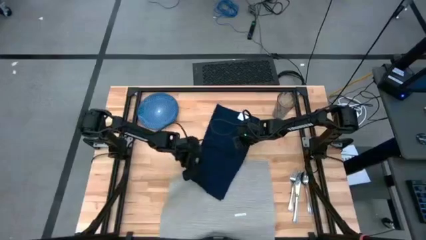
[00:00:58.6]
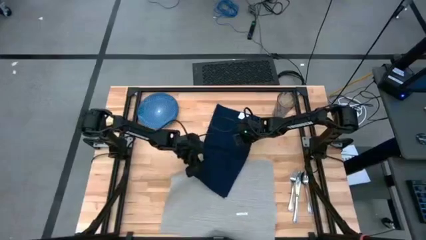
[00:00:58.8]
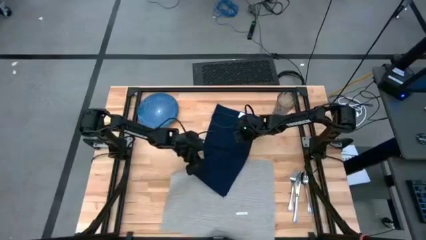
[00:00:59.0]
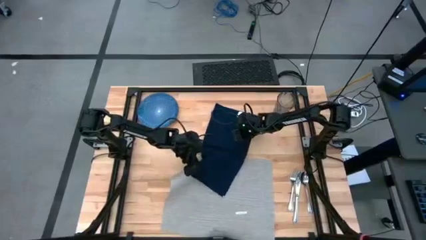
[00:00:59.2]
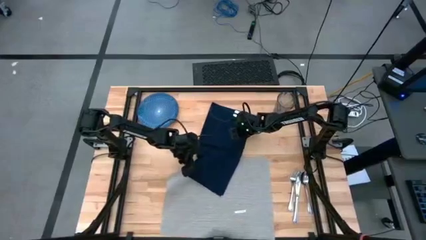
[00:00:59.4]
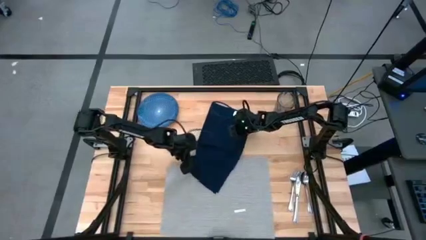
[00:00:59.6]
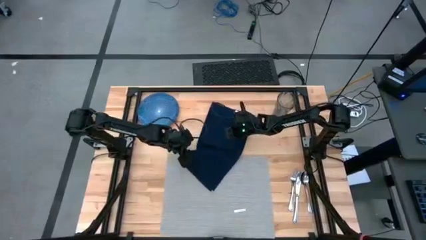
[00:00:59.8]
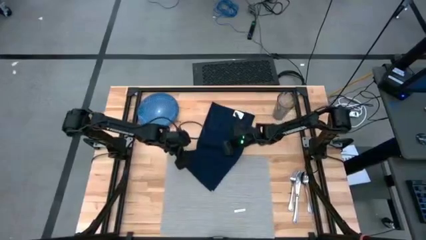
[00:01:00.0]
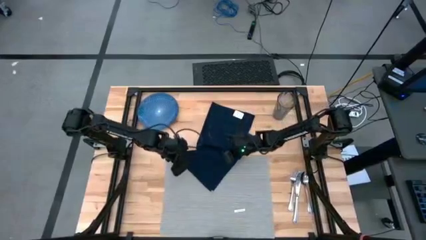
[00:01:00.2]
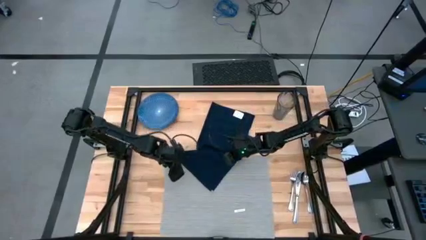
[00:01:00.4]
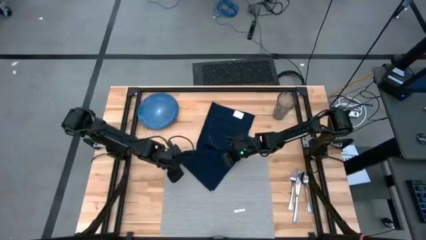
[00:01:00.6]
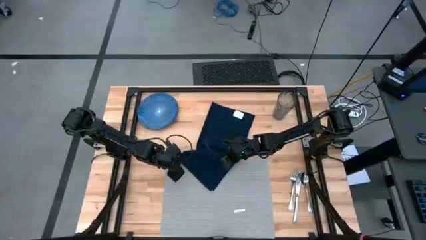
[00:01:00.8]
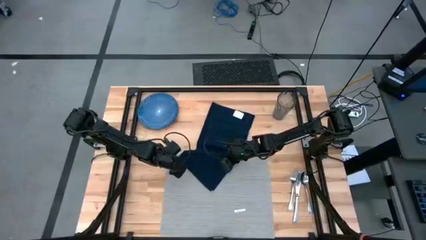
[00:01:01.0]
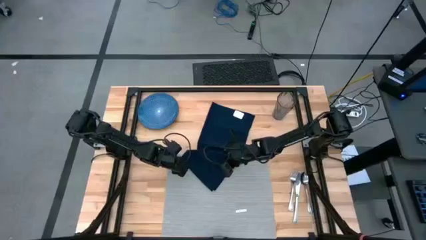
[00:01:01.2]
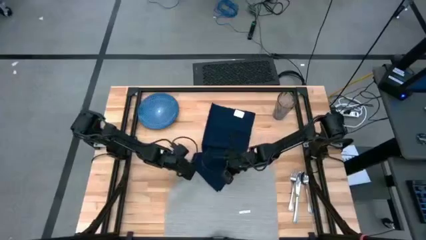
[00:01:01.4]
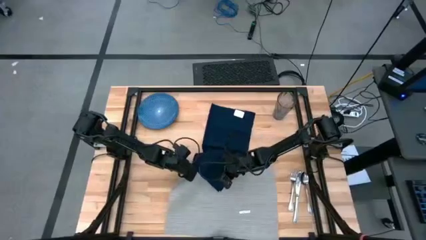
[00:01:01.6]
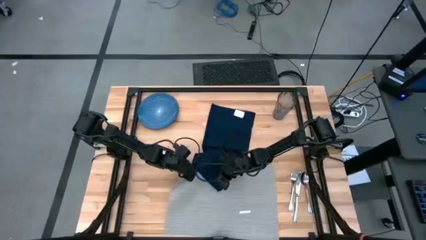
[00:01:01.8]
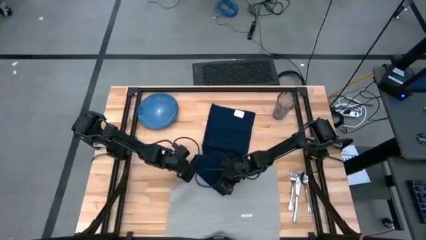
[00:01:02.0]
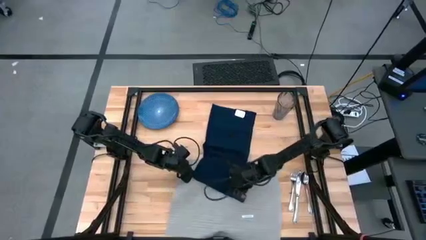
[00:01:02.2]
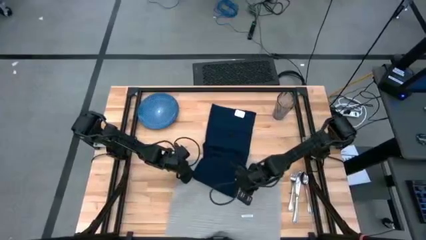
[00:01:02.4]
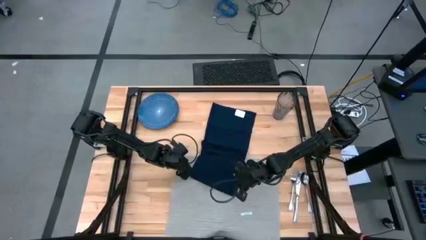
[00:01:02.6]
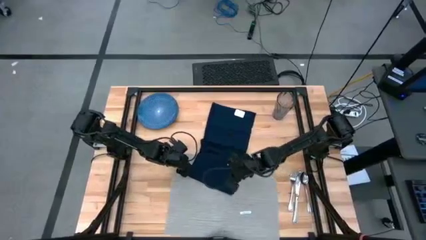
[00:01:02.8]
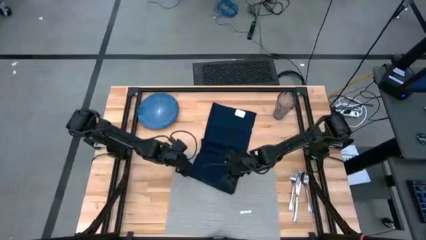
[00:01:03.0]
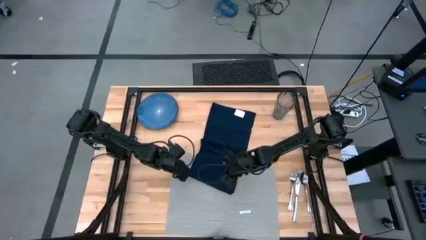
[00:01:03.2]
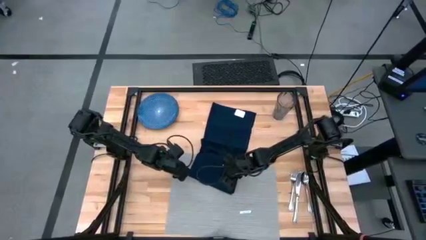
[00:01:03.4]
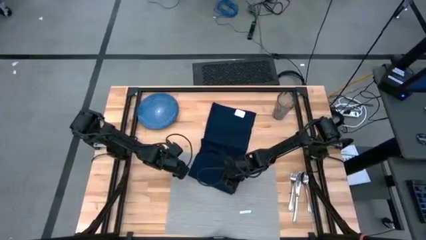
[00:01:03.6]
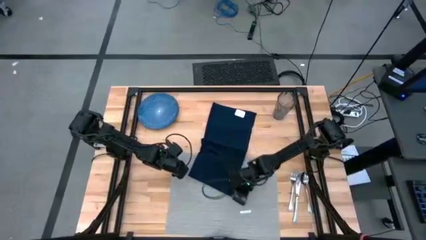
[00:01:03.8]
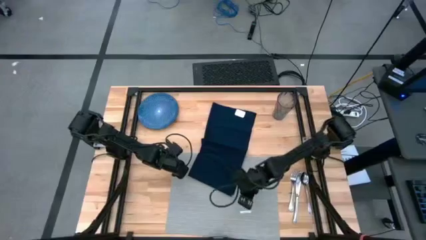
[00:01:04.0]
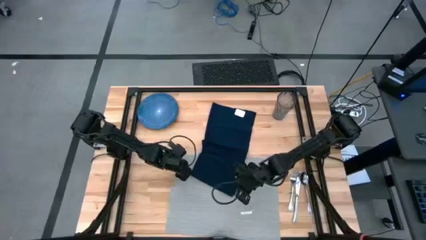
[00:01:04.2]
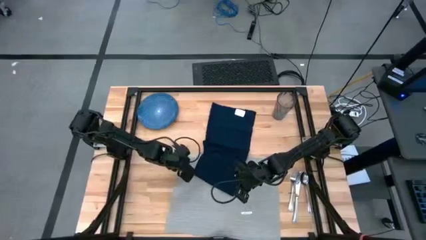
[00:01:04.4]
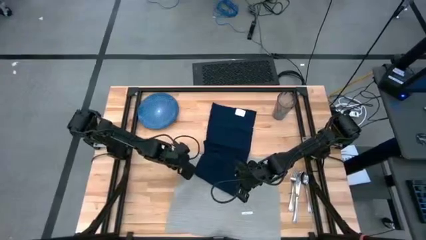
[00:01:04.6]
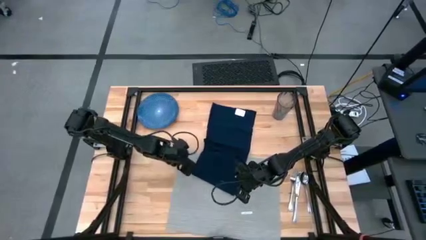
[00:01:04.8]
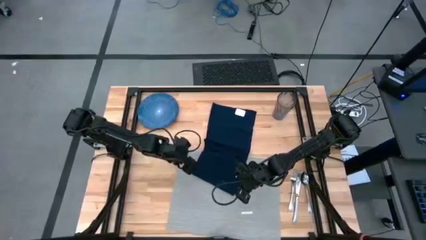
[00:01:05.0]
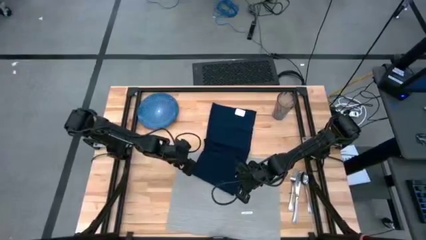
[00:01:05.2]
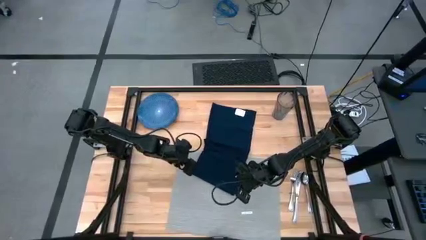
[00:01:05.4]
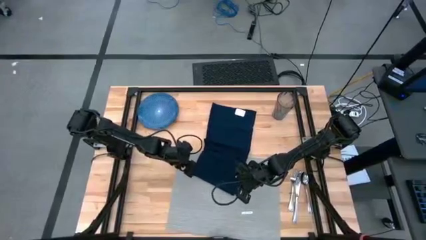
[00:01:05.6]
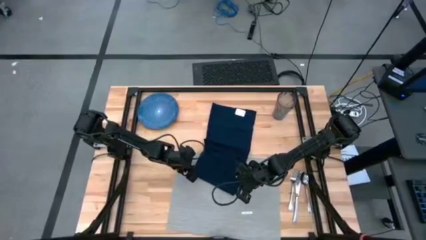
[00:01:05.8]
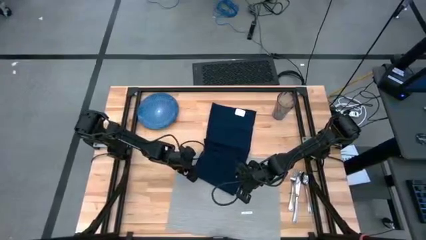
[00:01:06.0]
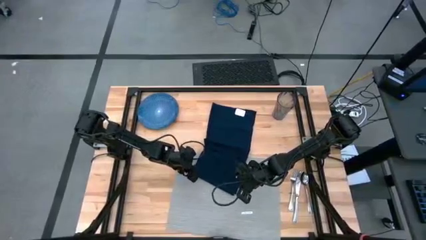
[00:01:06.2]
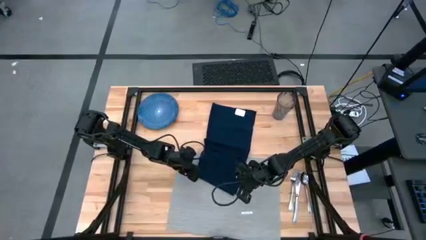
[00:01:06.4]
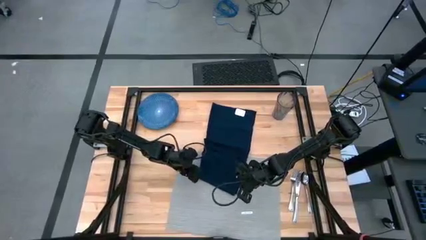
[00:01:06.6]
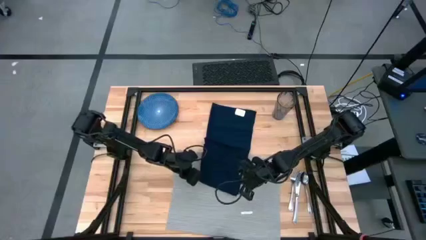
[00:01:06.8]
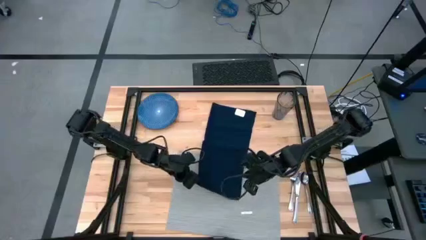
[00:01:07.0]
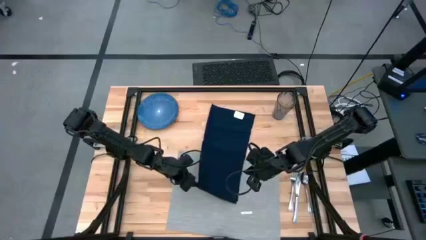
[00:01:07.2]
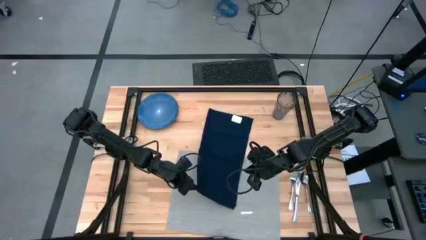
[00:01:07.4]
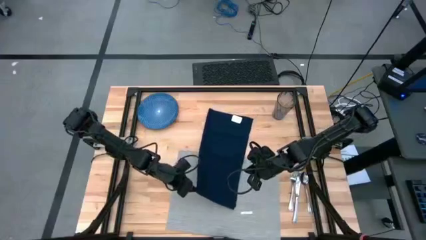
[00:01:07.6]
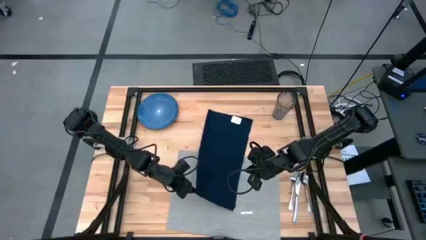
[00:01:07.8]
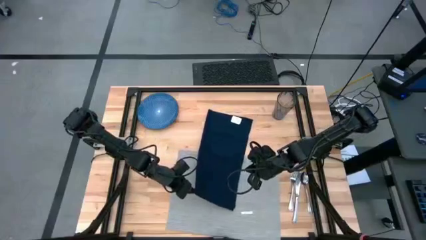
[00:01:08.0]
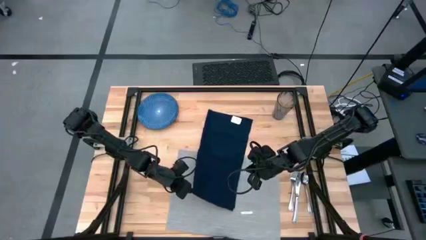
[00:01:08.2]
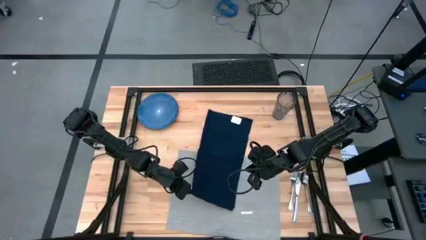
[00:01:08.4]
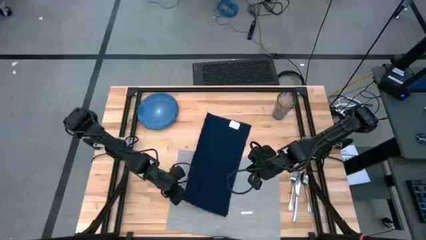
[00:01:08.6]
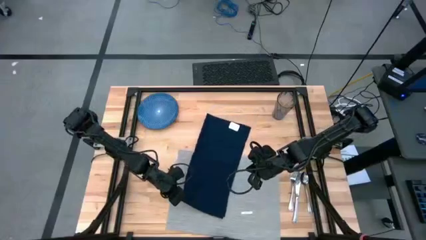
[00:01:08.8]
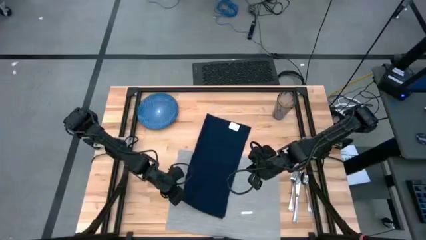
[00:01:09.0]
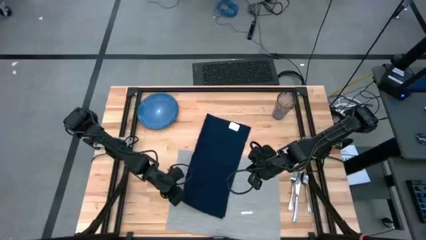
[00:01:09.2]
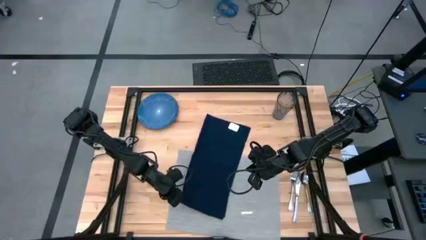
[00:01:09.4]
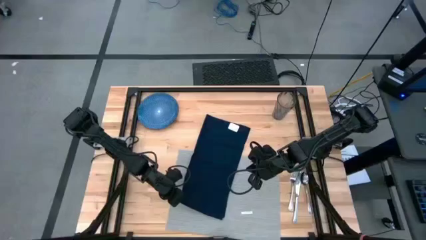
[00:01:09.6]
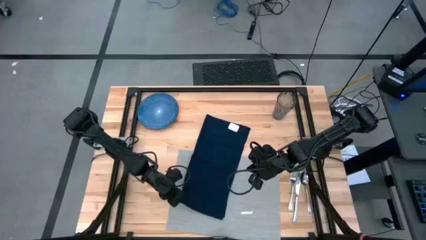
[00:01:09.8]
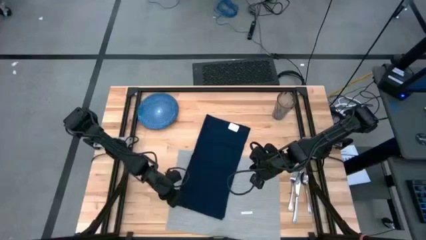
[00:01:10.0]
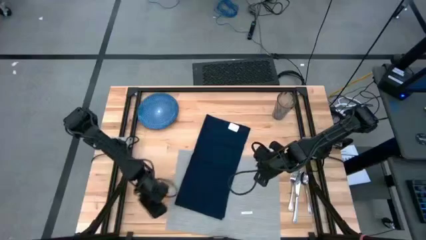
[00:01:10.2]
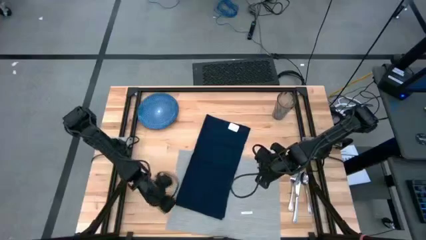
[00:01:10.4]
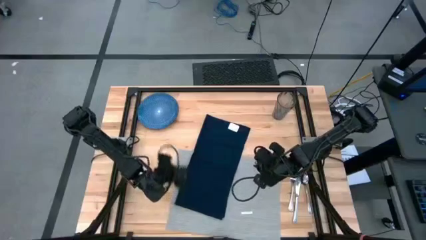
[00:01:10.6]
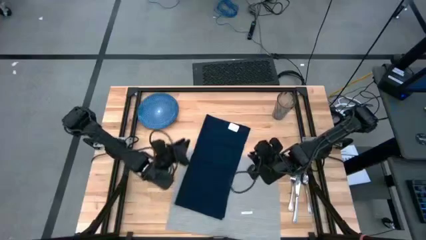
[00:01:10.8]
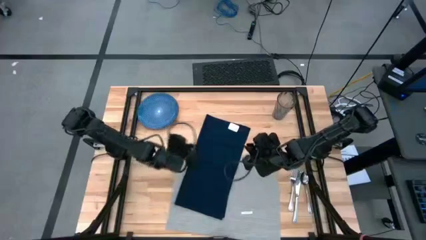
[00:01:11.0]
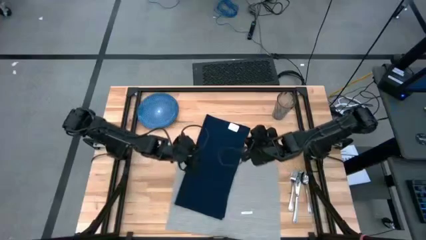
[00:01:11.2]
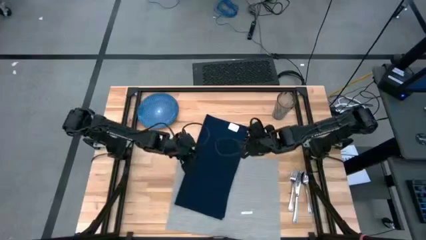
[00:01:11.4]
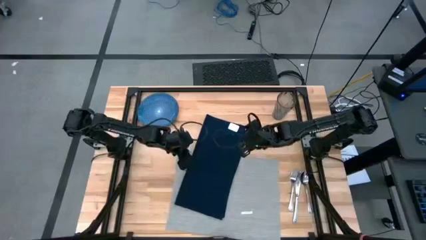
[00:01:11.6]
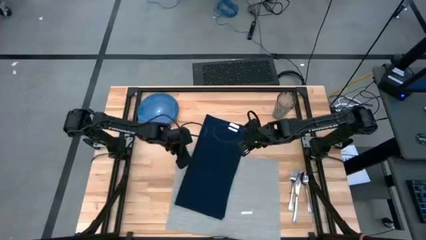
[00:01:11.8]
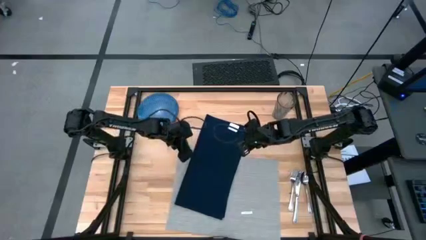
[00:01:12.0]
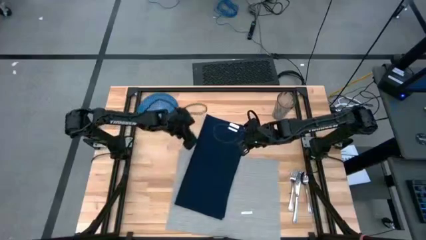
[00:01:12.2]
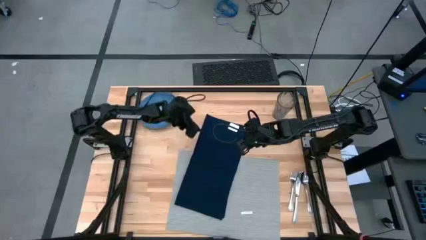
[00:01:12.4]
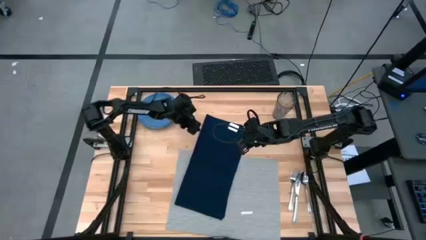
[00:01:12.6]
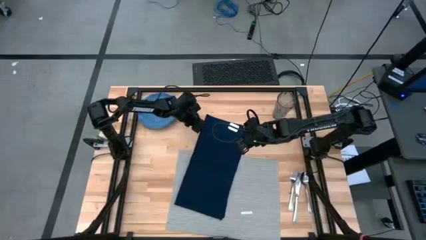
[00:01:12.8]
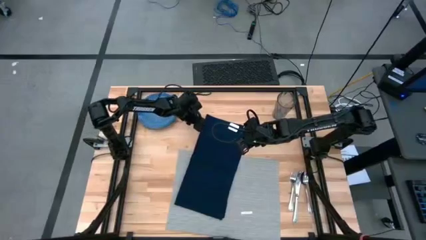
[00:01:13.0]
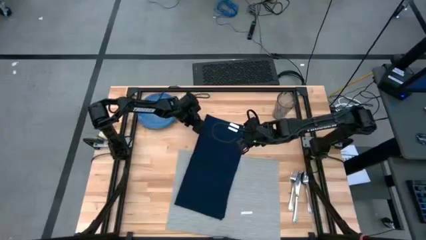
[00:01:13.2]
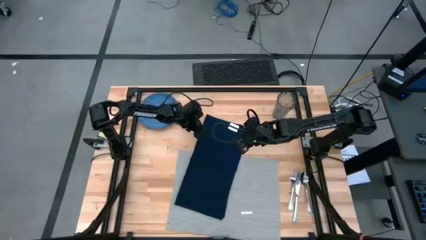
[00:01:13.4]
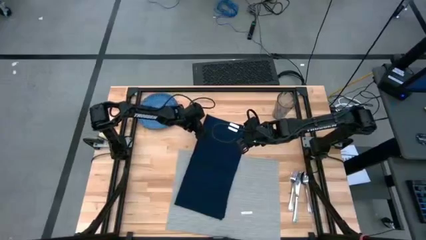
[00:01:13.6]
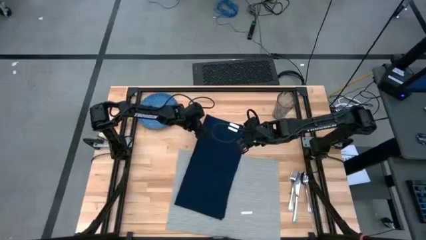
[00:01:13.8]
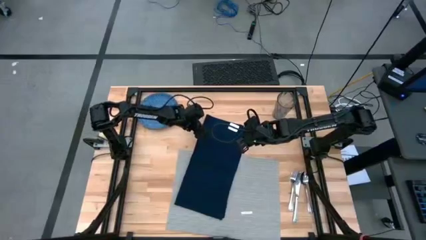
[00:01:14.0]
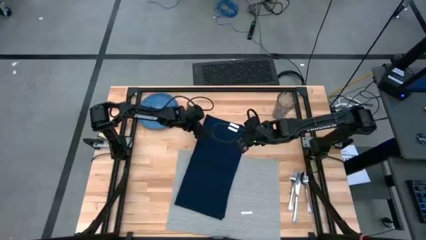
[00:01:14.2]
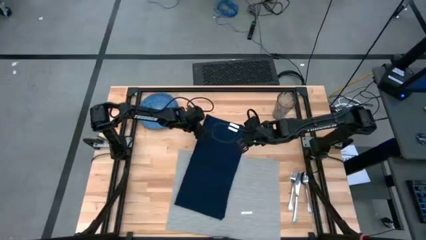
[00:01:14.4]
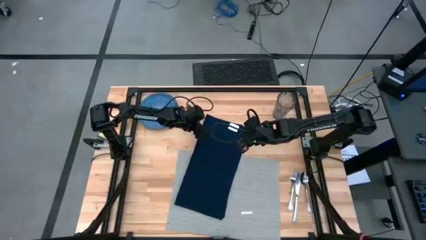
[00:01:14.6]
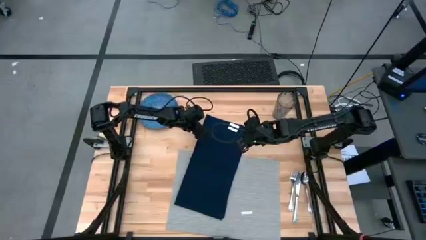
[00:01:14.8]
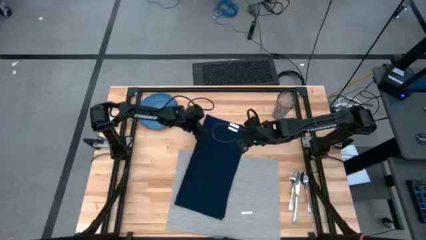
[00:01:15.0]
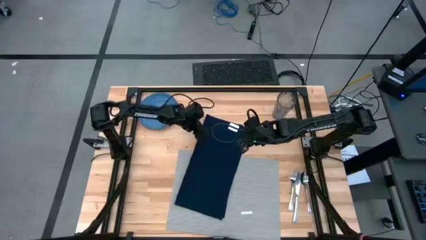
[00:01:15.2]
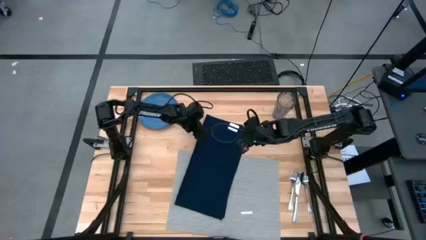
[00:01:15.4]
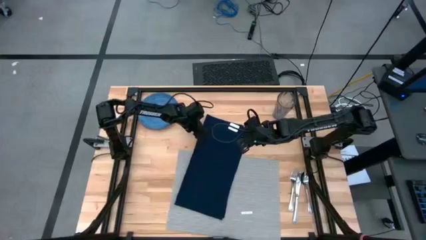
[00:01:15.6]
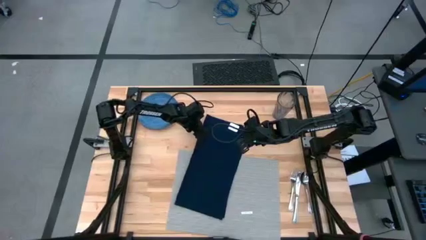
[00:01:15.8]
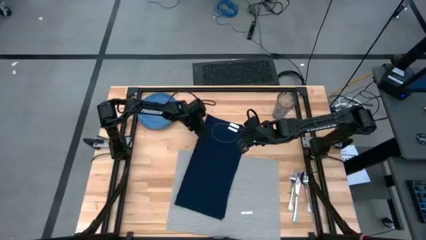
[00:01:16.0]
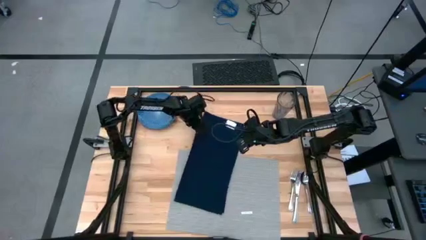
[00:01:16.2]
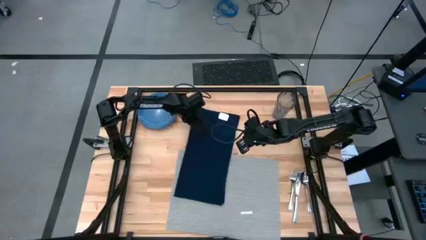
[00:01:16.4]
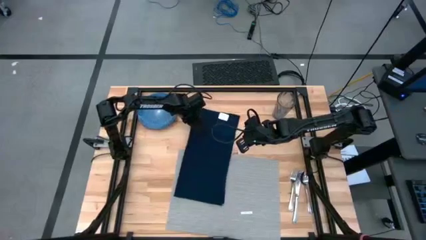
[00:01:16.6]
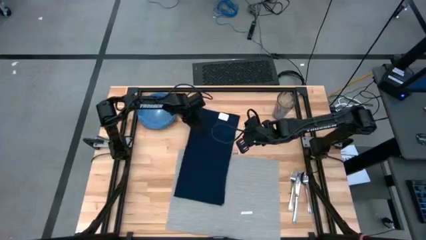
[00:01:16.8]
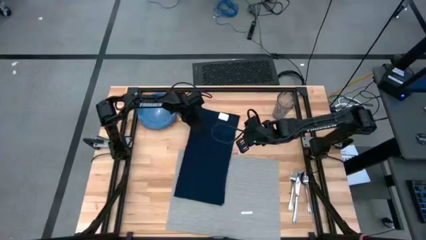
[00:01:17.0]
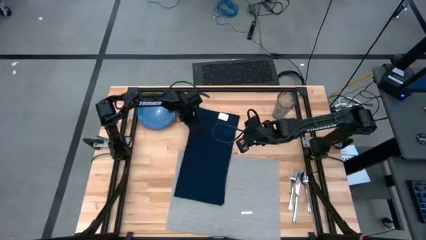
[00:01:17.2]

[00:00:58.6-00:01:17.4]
Task: Set table place
Fold the dark blue napkin
